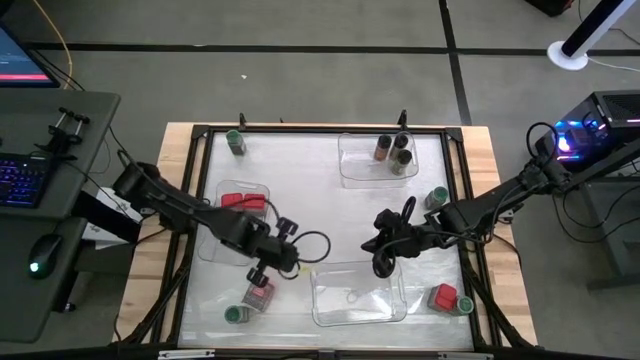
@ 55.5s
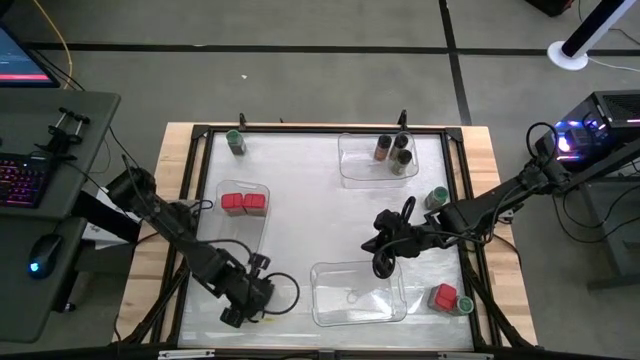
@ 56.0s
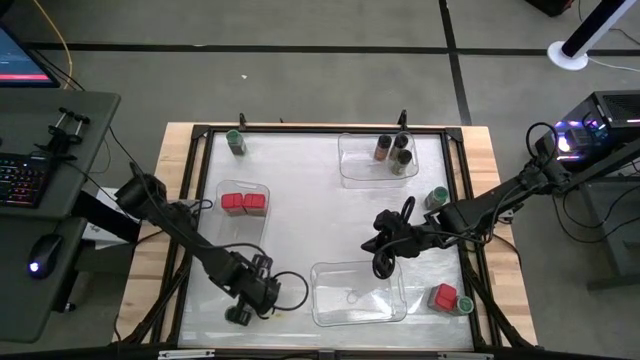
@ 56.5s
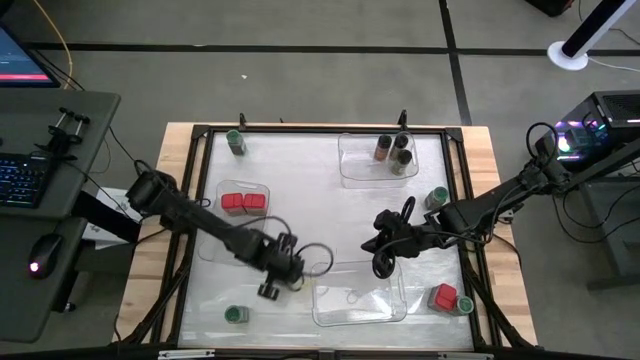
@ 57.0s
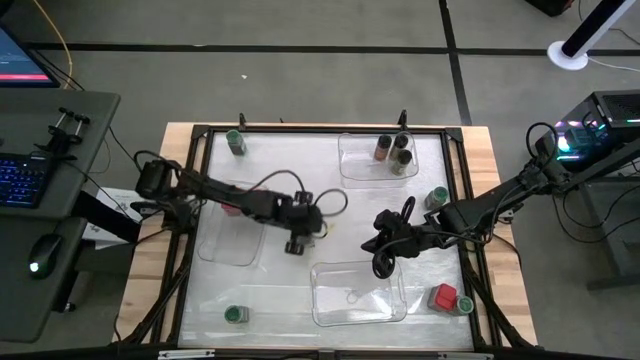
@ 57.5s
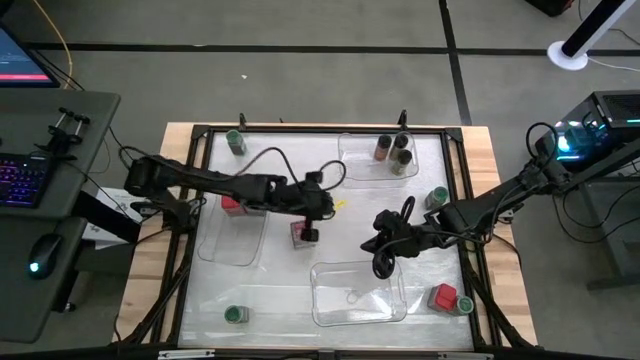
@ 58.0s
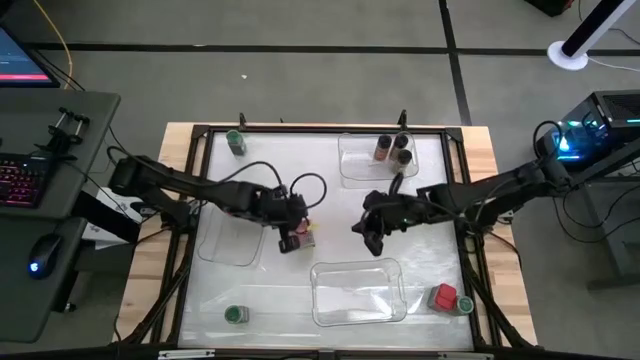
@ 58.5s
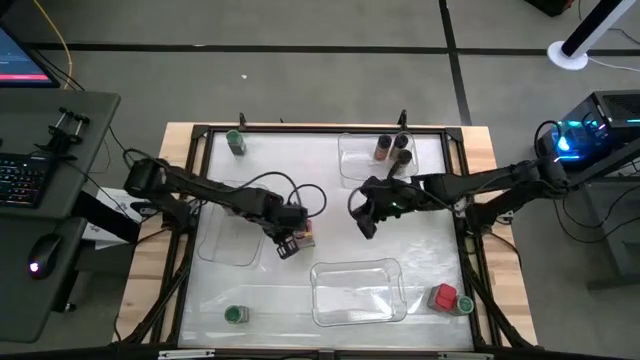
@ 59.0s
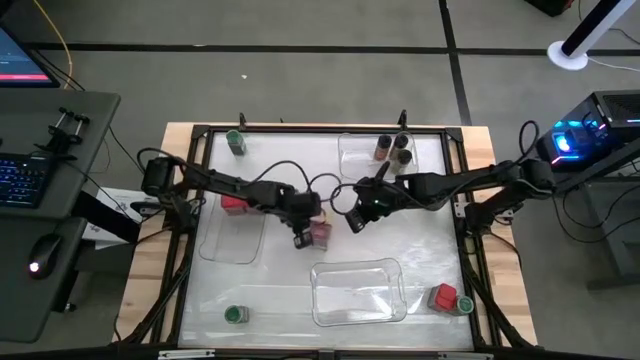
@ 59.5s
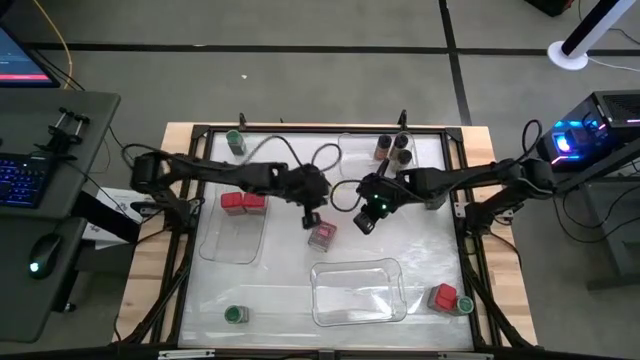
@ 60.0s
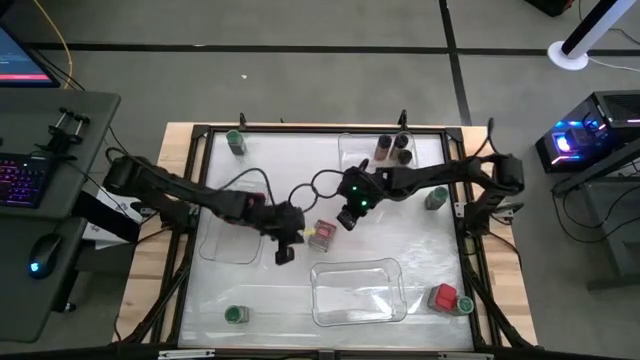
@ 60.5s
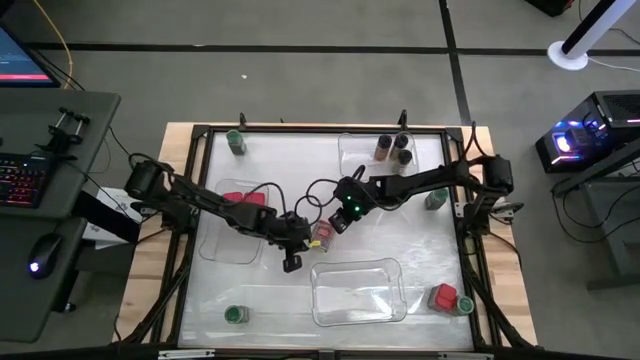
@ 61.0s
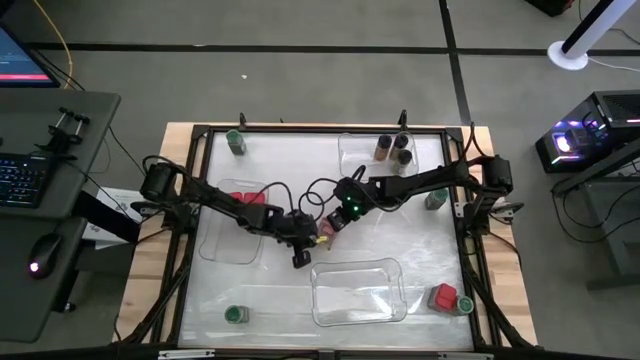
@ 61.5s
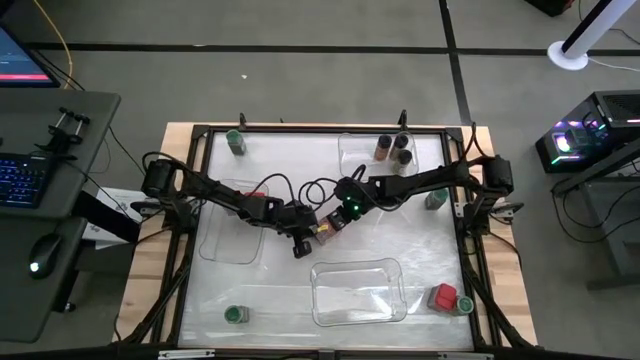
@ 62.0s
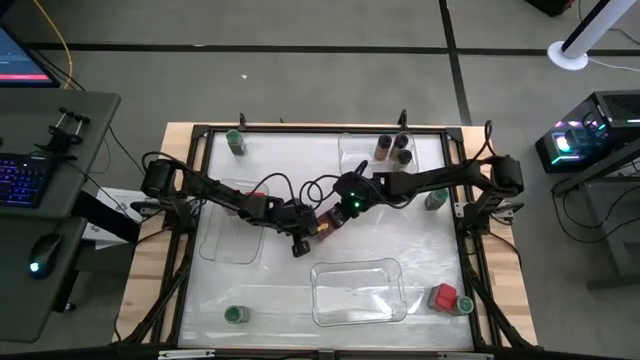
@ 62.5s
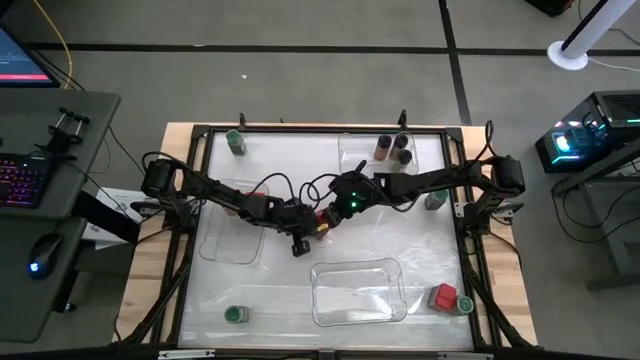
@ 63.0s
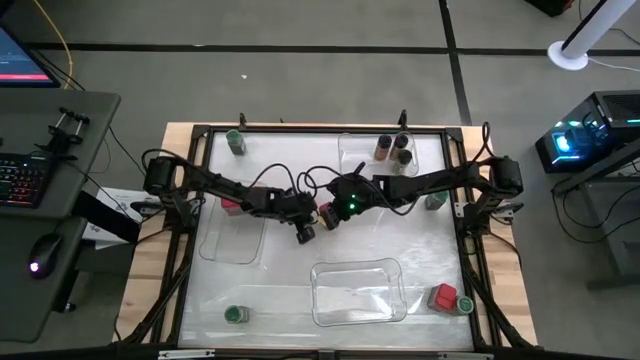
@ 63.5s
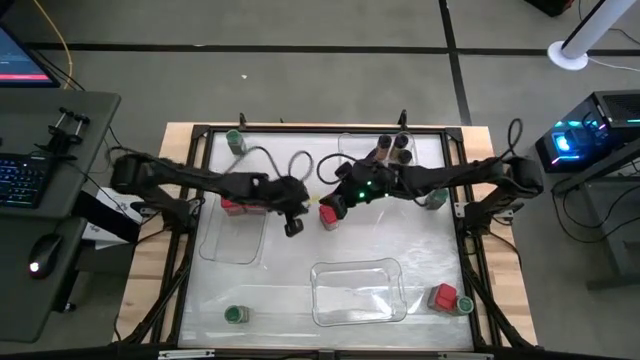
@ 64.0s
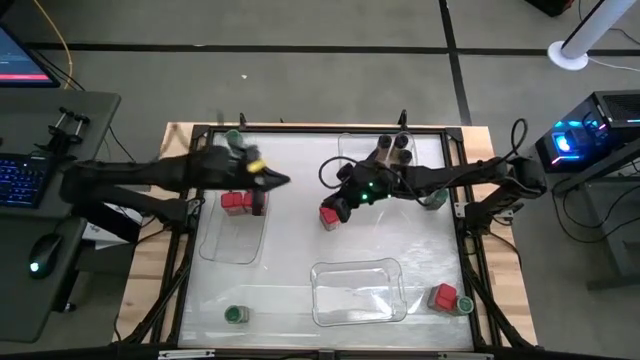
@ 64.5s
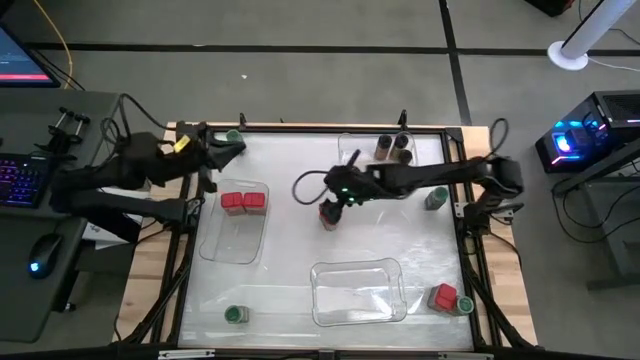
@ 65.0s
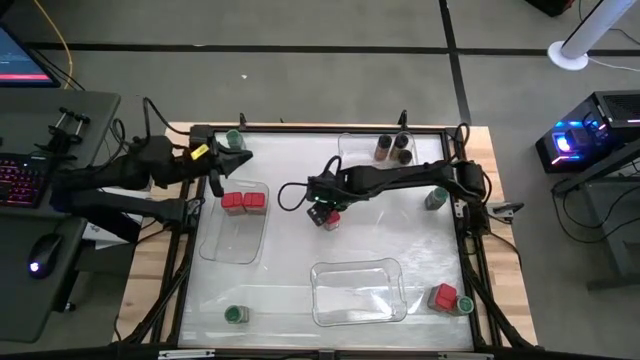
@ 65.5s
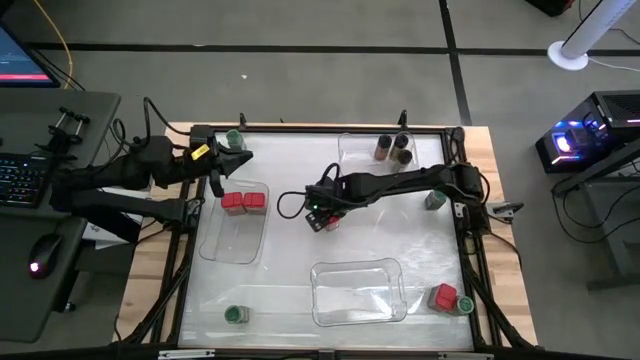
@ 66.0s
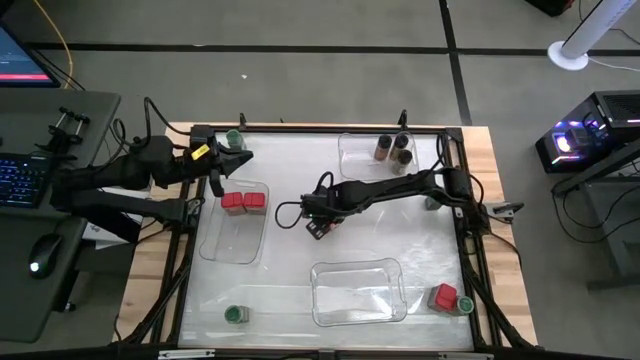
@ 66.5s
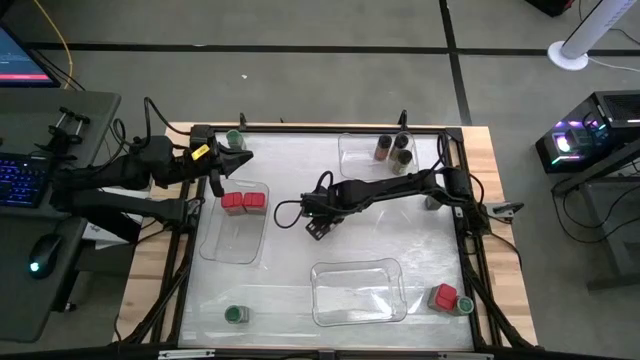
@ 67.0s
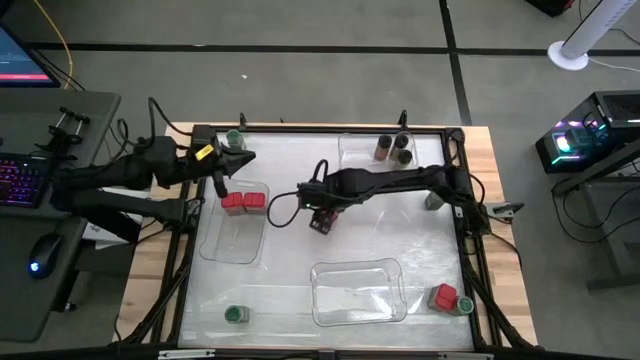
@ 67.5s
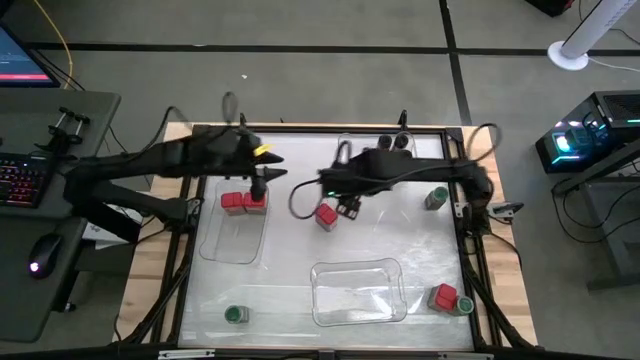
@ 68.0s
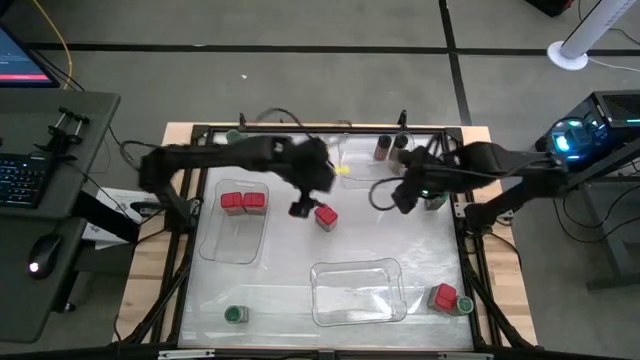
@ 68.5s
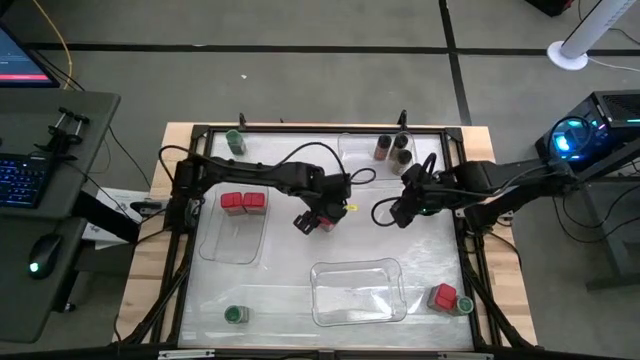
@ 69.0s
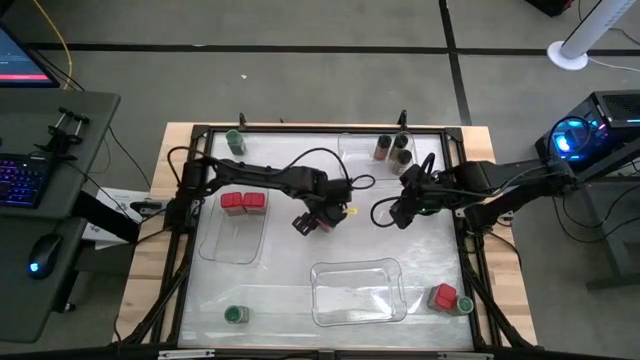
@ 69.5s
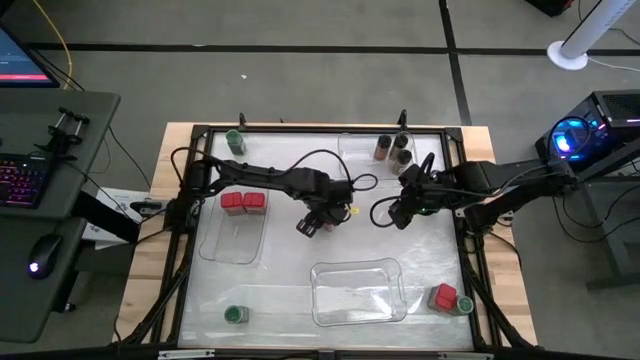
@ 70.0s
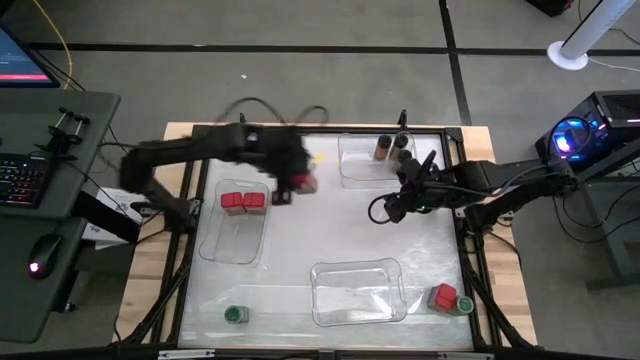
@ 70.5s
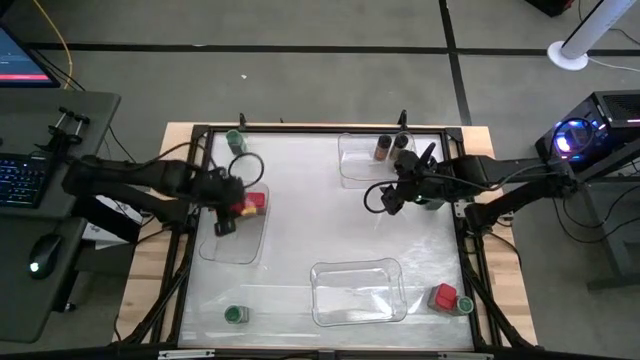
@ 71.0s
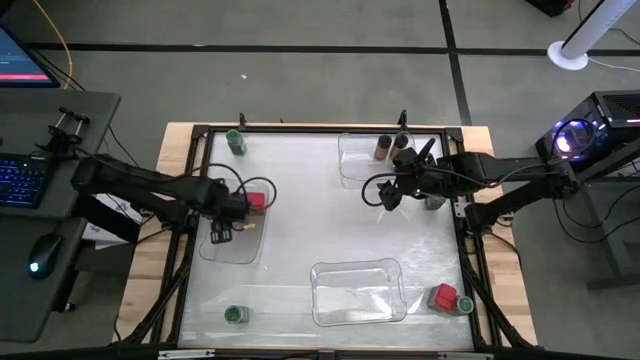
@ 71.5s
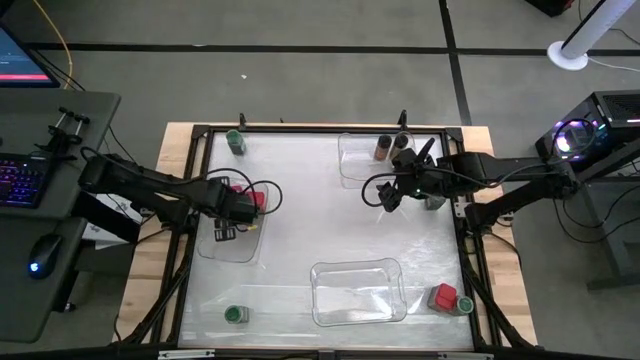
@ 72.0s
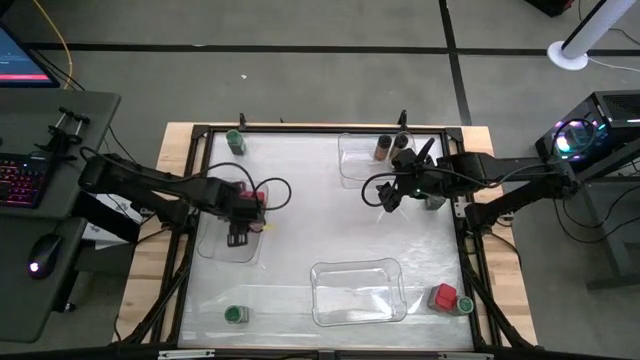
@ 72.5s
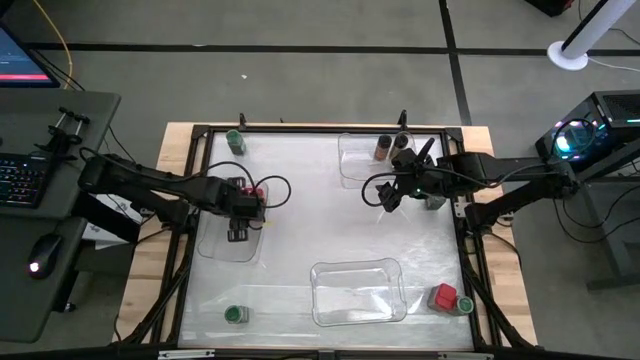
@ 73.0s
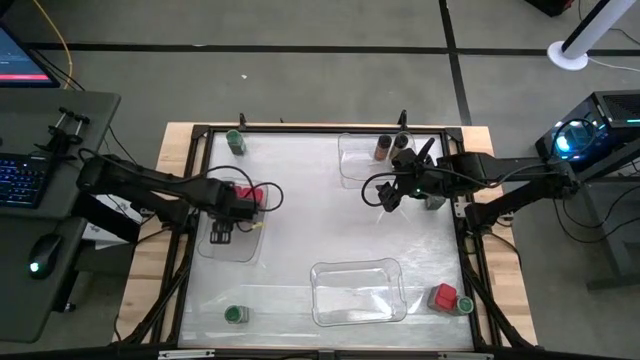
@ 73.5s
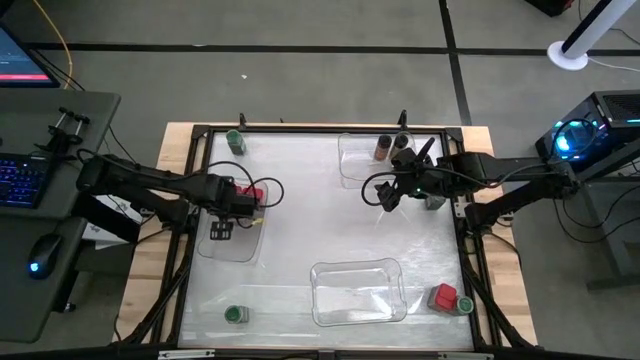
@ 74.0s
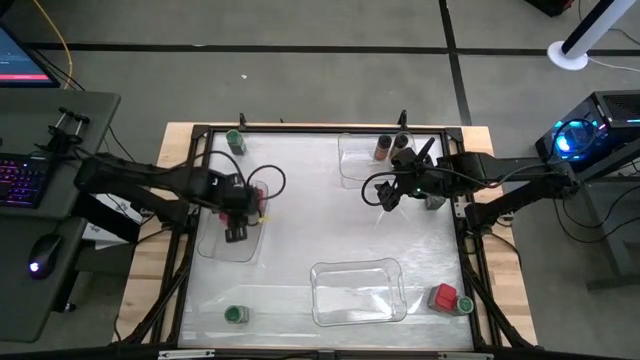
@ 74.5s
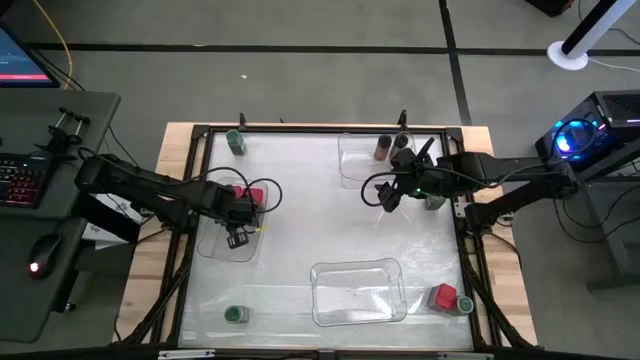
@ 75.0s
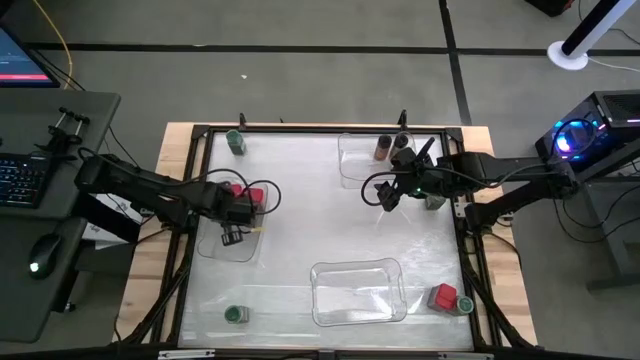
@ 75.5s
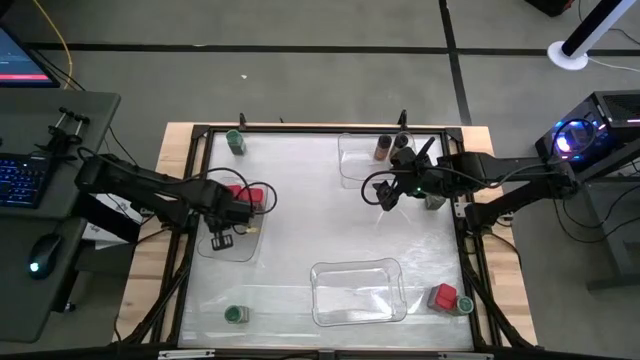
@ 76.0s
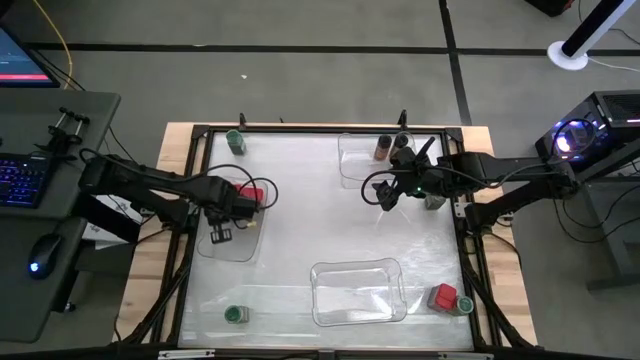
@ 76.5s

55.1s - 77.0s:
Task: Sort spices by type
Put the red seasoning can into the middle left transparent bin
